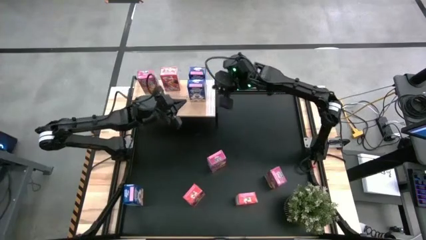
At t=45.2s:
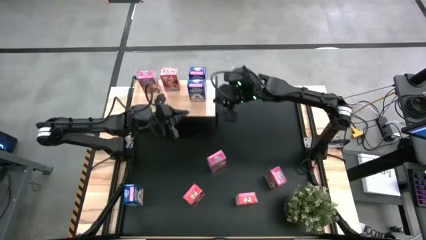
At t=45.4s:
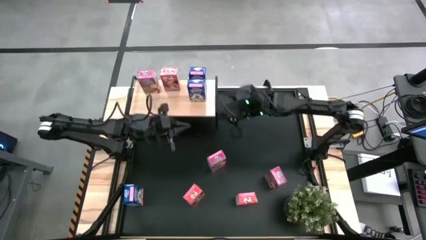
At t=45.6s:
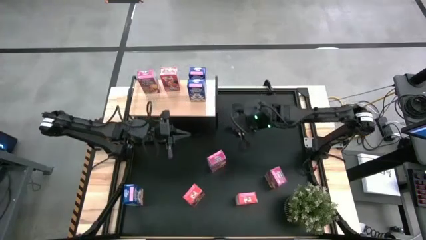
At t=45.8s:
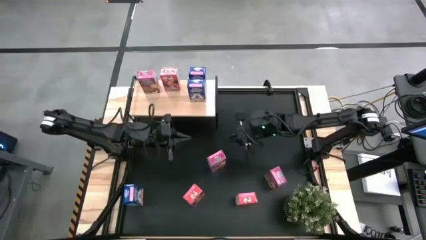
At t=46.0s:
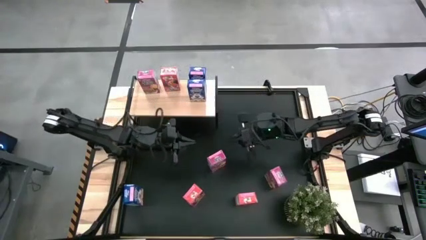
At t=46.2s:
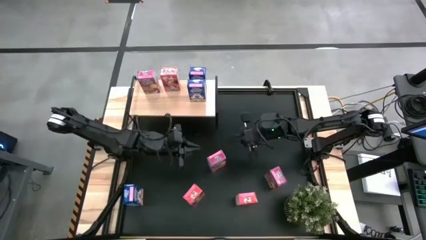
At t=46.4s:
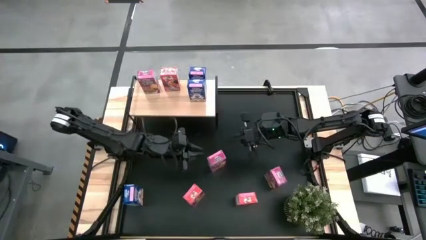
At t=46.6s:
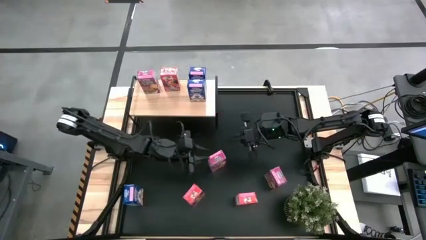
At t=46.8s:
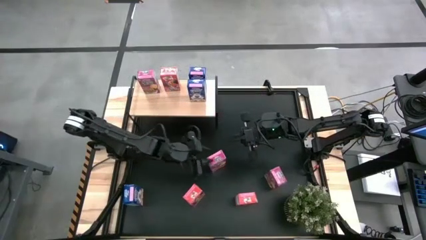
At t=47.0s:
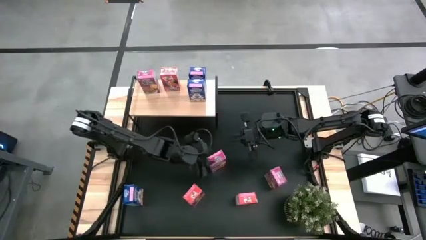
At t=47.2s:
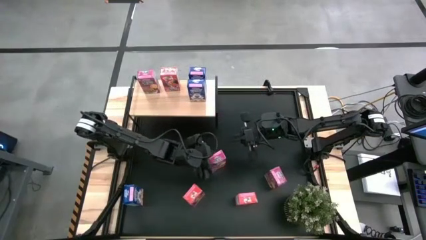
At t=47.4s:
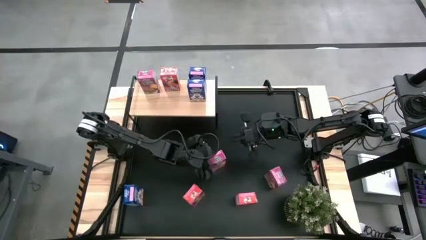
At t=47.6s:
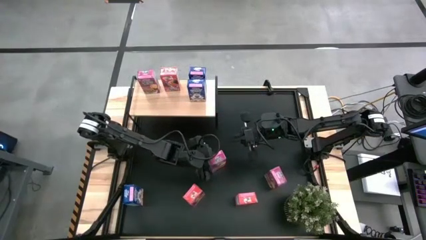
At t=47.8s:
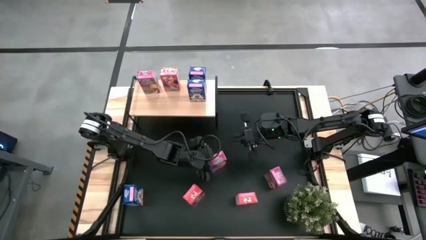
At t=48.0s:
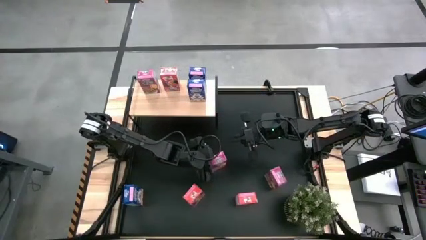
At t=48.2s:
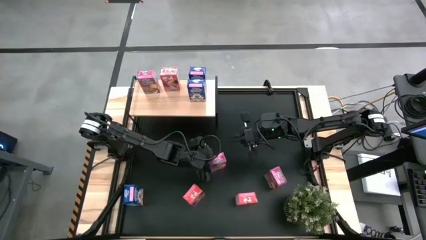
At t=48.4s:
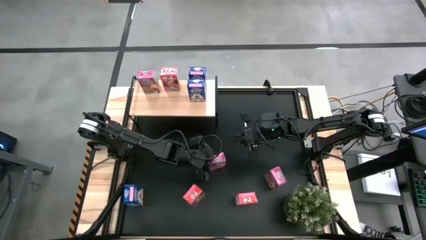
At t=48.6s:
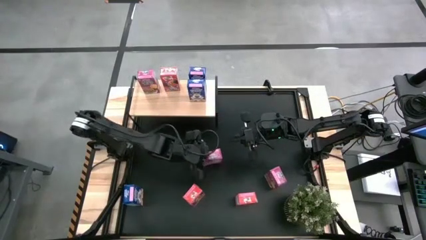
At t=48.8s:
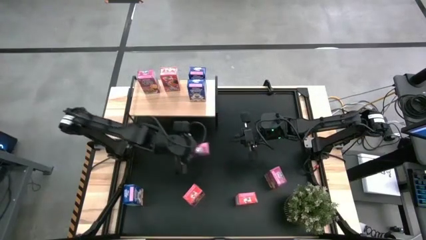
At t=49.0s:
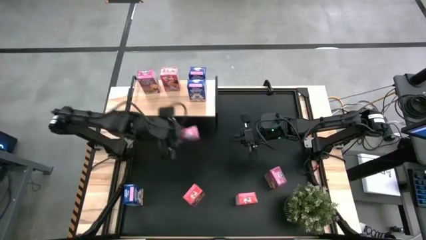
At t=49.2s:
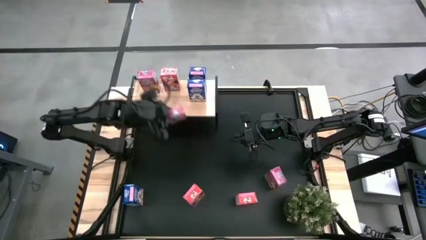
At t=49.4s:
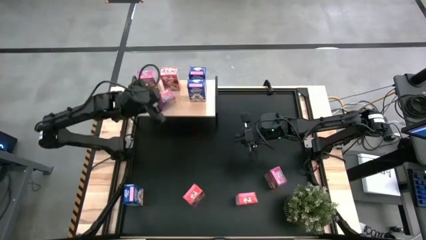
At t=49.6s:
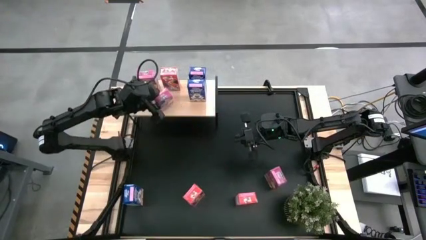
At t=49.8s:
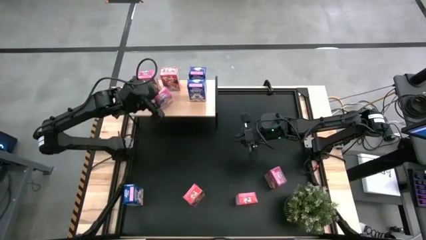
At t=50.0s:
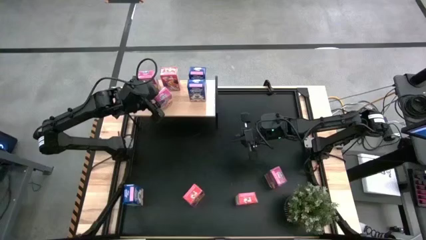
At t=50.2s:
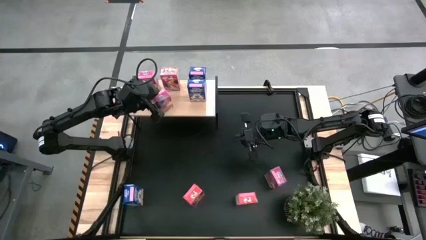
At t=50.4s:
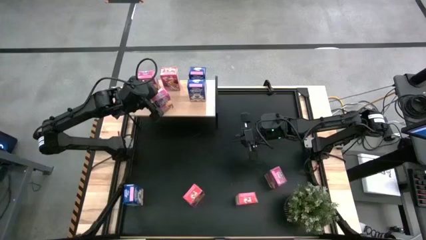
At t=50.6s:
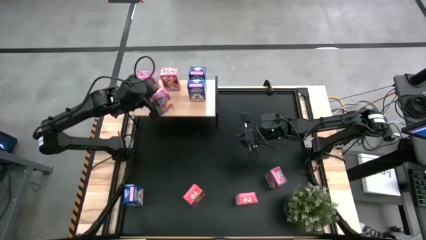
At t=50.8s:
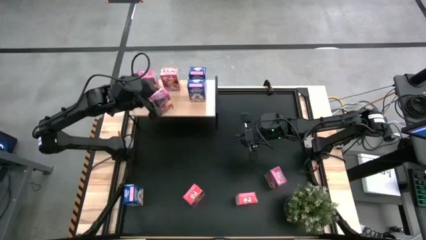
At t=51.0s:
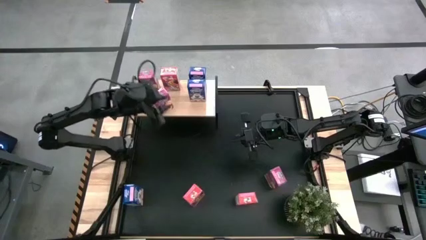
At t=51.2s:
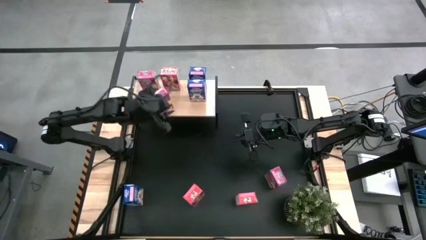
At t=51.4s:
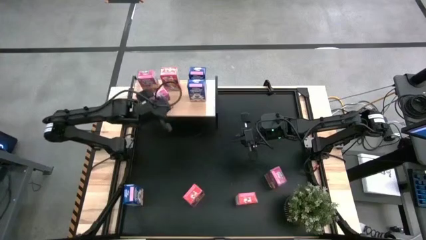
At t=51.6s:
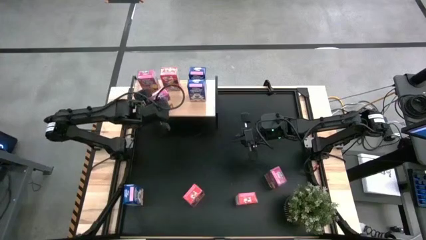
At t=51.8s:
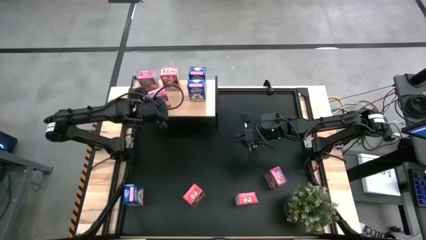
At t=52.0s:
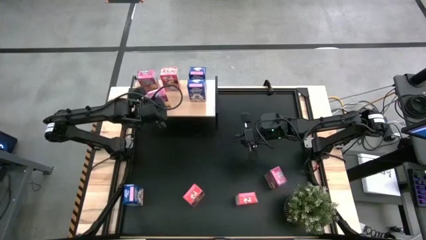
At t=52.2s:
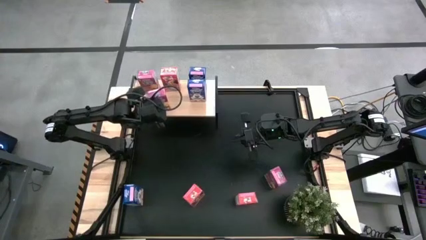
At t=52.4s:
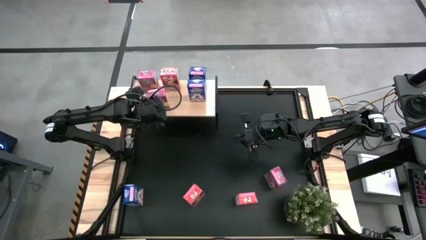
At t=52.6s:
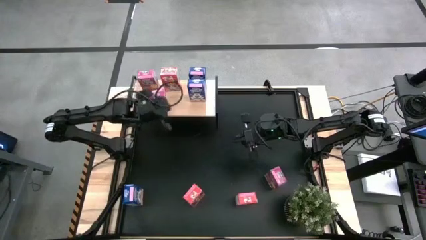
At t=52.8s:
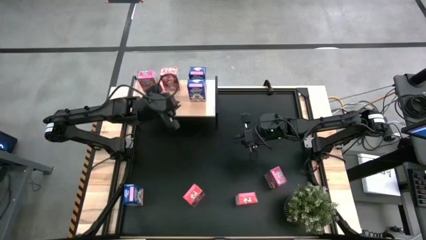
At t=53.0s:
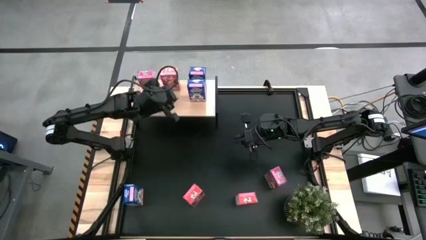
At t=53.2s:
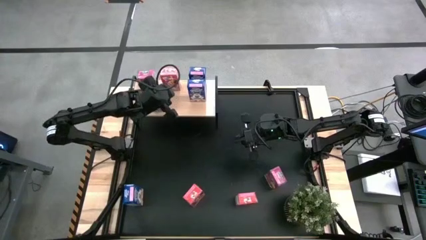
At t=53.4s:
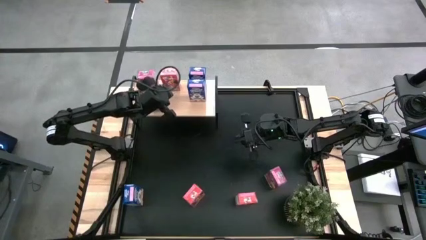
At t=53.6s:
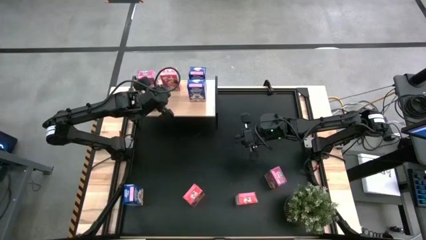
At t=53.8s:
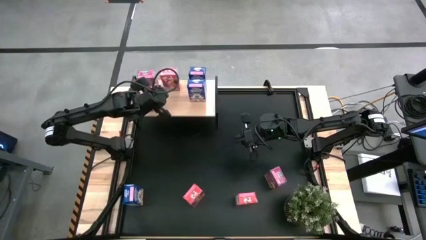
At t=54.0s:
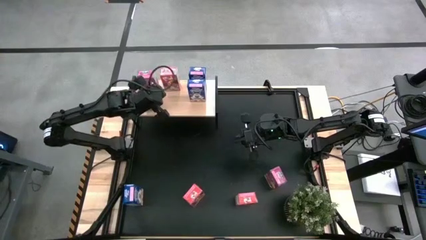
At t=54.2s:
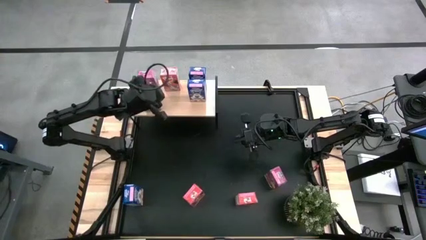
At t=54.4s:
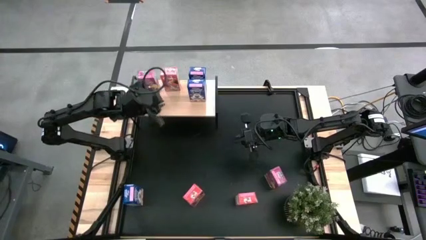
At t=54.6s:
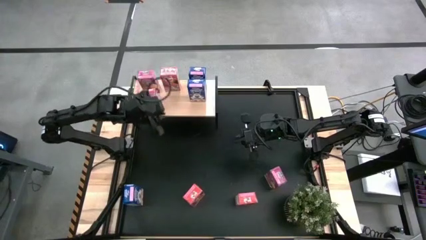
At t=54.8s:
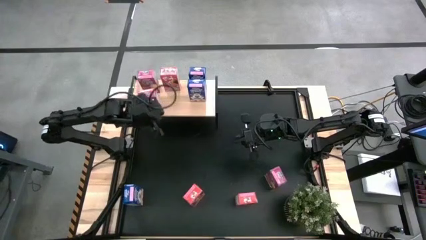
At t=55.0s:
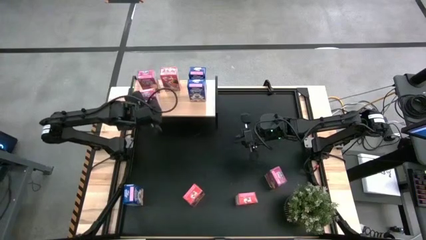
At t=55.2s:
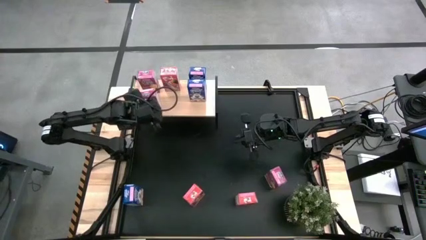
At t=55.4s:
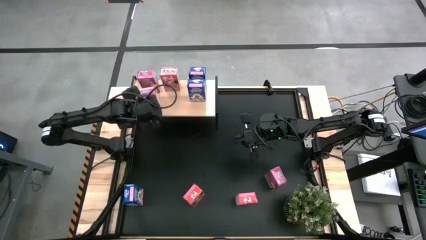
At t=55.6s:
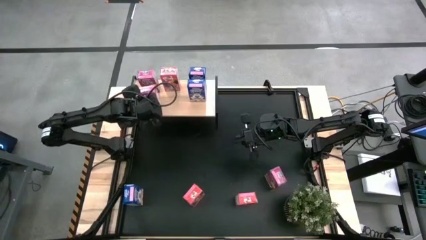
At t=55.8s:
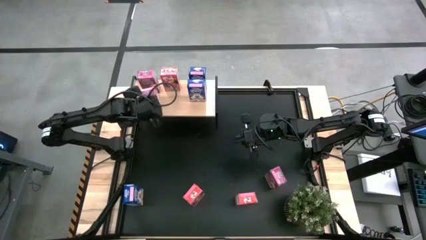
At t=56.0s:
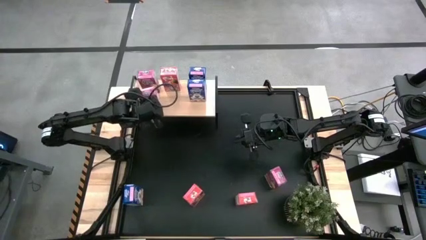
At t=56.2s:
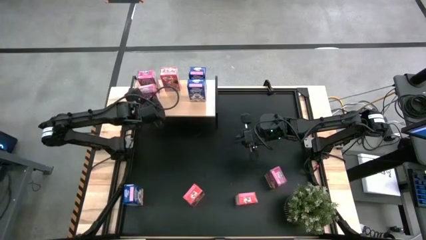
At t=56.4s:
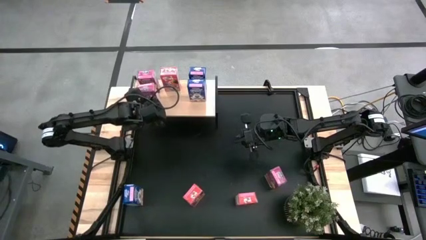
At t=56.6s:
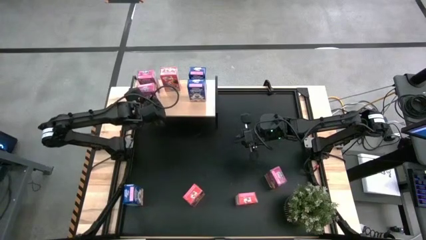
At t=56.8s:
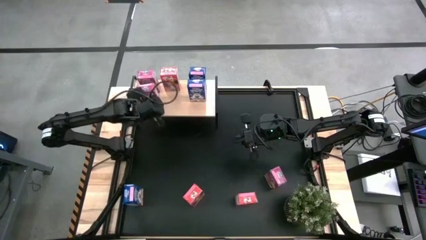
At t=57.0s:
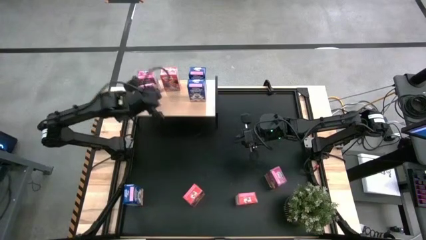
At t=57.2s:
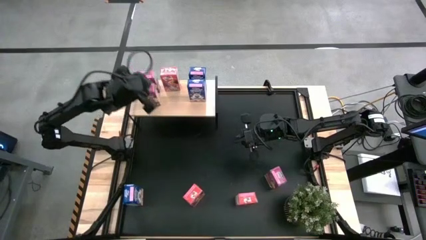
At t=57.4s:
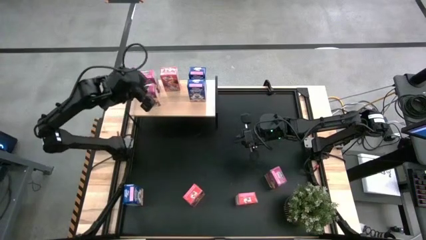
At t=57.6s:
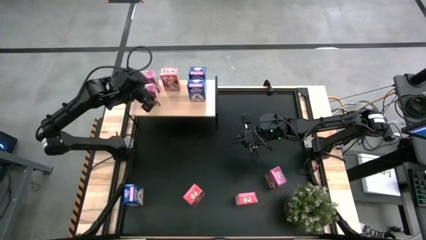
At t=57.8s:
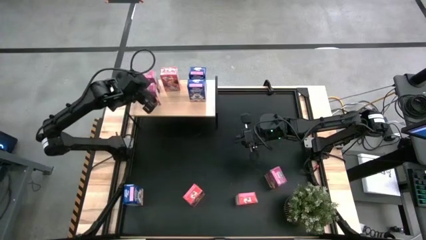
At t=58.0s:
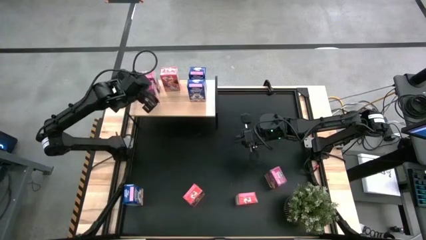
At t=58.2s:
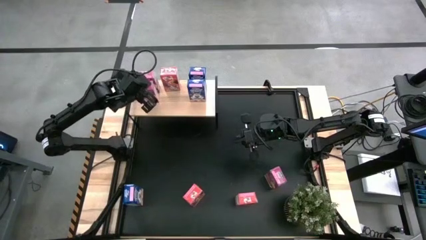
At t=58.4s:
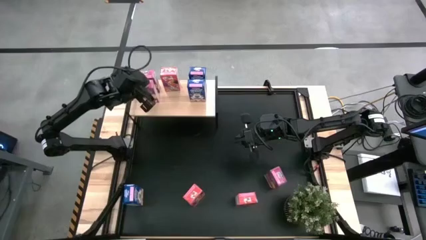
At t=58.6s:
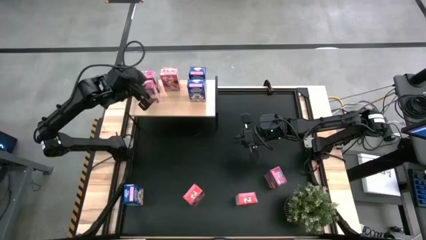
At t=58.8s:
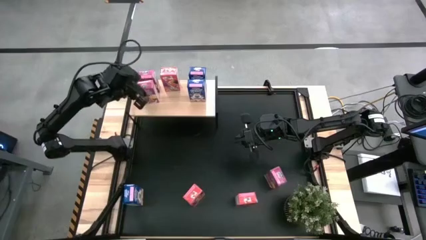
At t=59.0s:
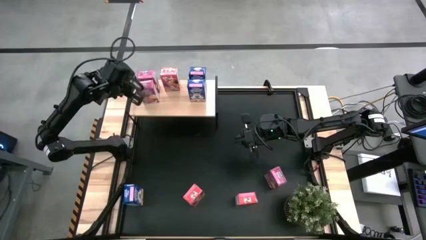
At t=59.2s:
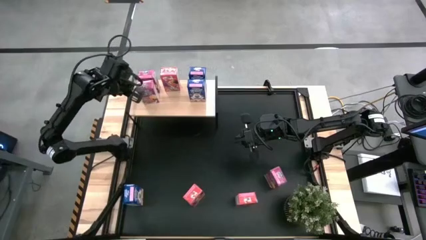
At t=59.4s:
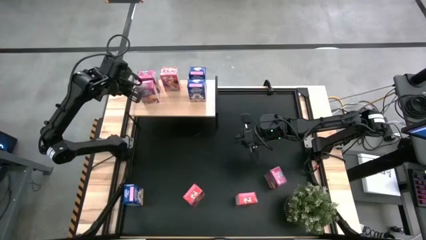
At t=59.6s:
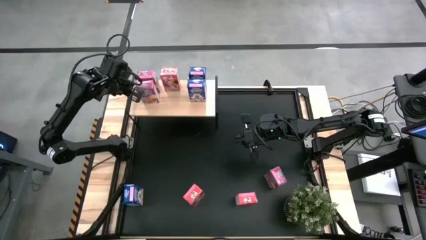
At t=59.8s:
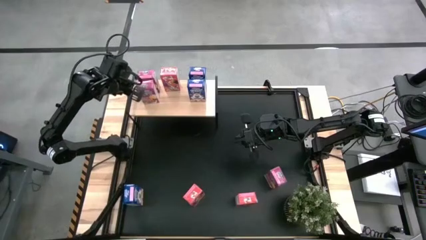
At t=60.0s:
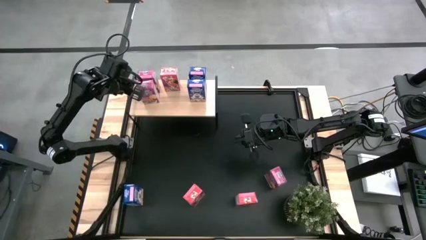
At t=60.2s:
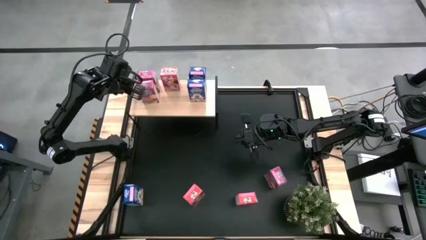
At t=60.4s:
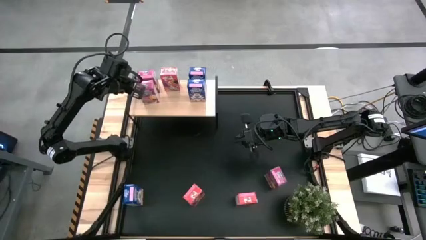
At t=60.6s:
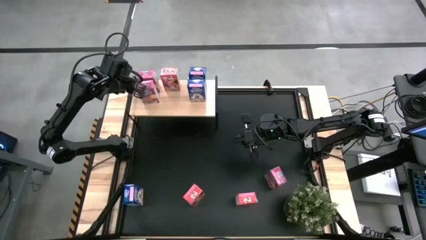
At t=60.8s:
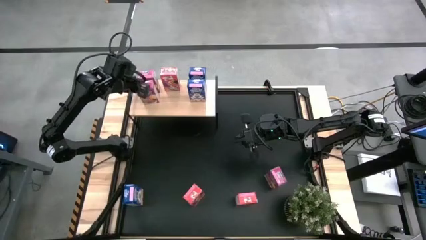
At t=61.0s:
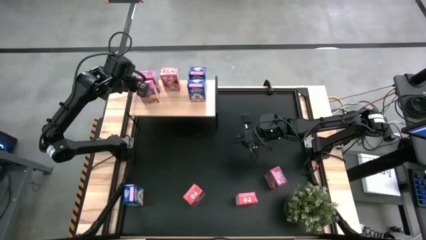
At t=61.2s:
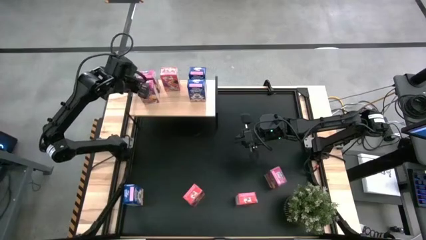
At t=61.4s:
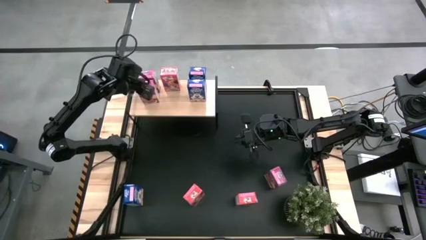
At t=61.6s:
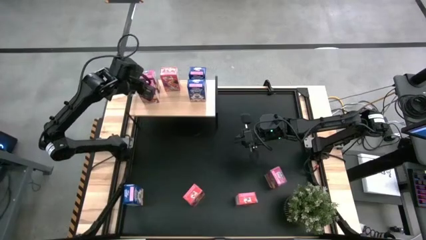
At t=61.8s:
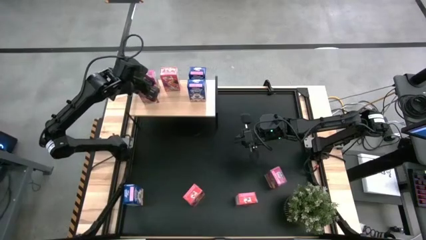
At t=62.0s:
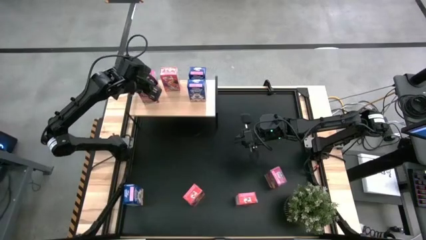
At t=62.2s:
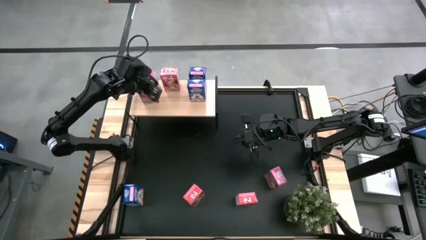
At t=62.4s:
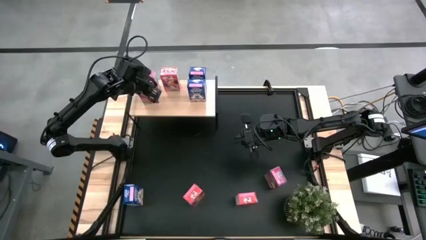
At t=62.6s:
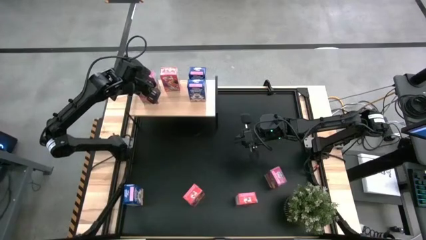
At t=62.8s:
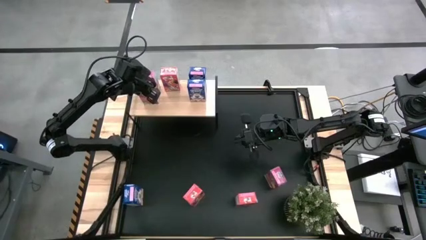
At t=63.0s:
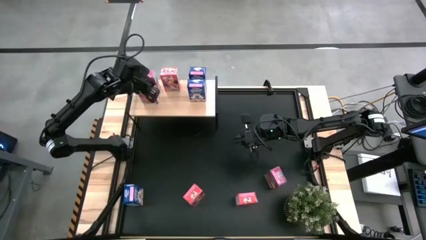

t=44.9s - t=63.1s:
Task: Stack cereal on shelf
Align the left purple cereal box with the other purple cereal box on the shelf
